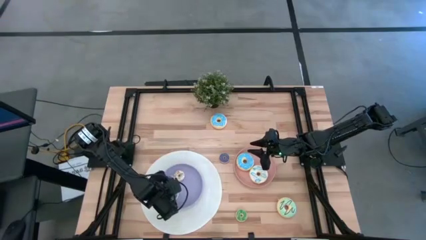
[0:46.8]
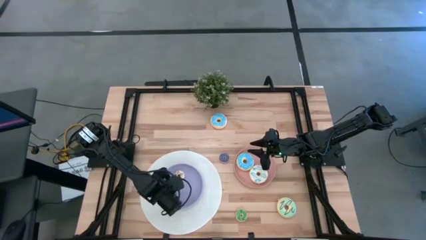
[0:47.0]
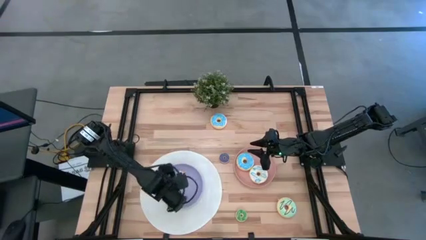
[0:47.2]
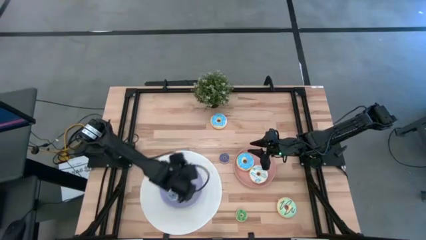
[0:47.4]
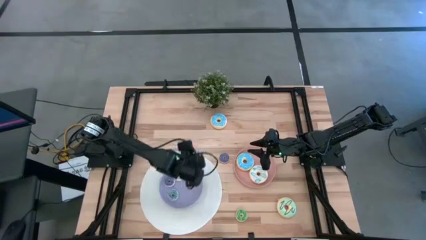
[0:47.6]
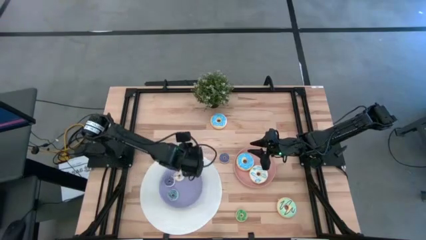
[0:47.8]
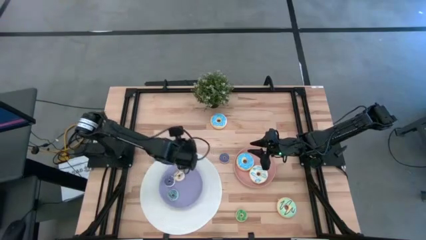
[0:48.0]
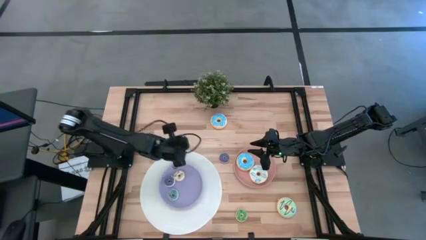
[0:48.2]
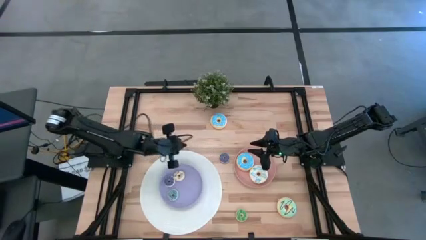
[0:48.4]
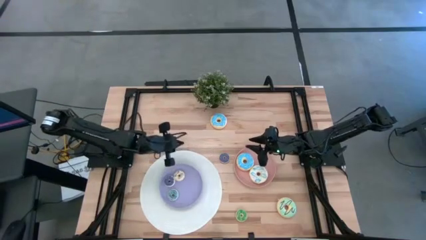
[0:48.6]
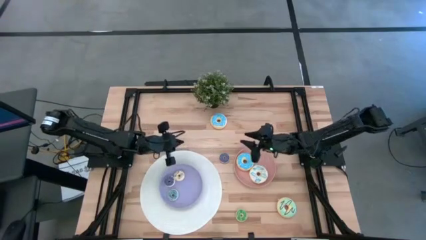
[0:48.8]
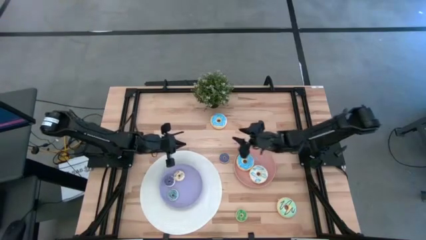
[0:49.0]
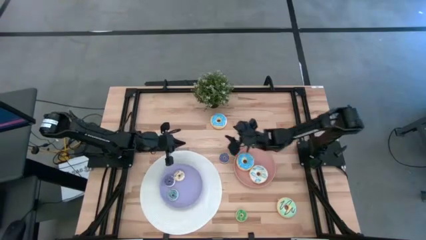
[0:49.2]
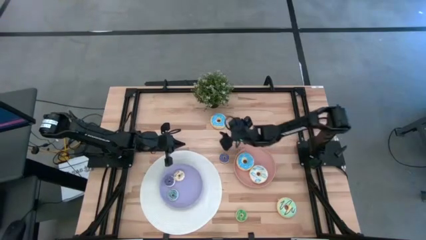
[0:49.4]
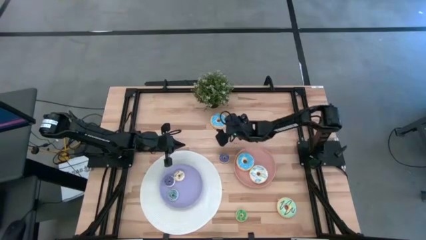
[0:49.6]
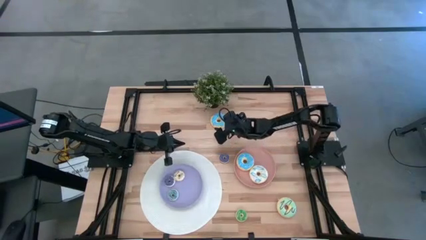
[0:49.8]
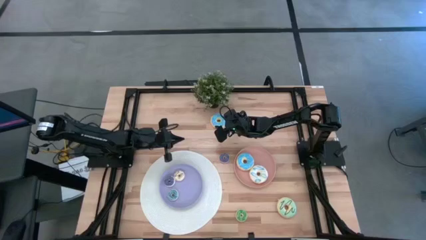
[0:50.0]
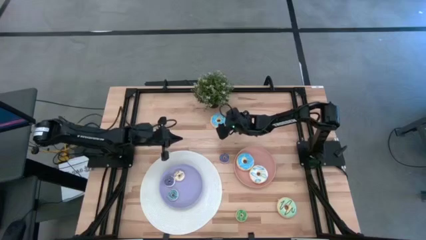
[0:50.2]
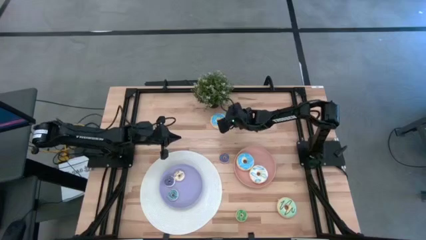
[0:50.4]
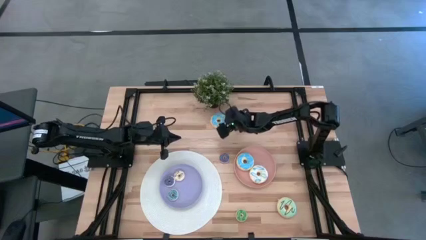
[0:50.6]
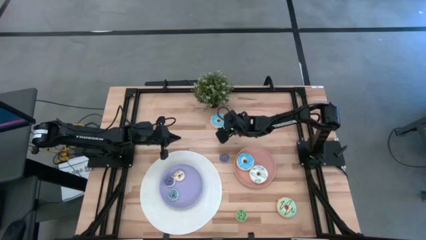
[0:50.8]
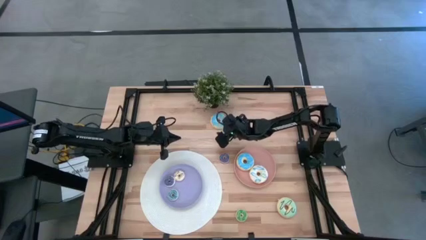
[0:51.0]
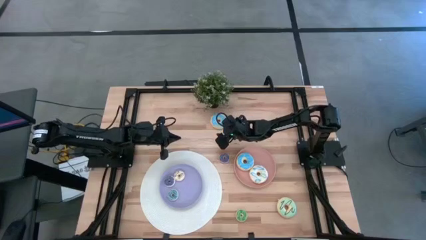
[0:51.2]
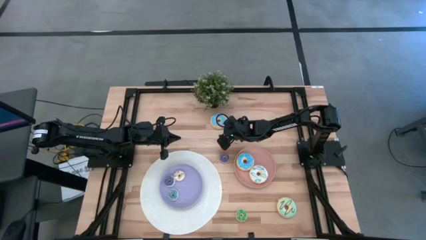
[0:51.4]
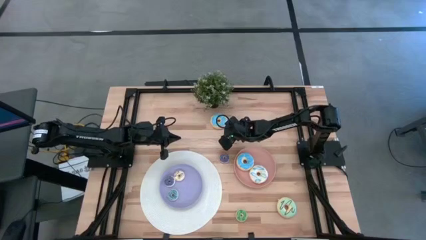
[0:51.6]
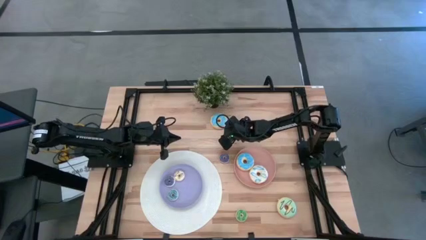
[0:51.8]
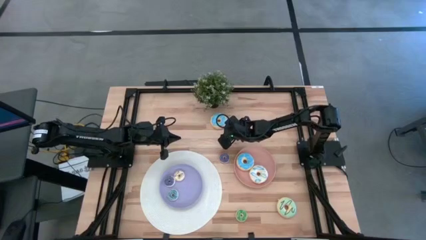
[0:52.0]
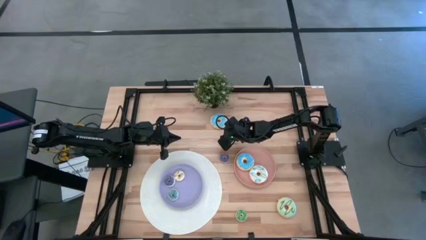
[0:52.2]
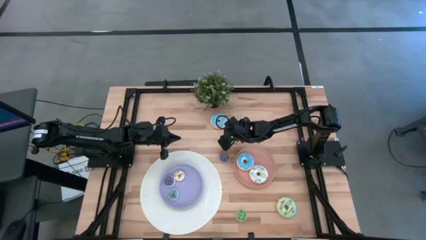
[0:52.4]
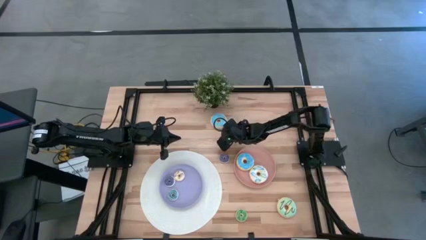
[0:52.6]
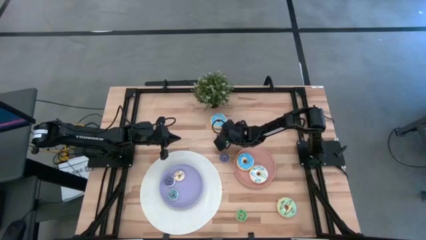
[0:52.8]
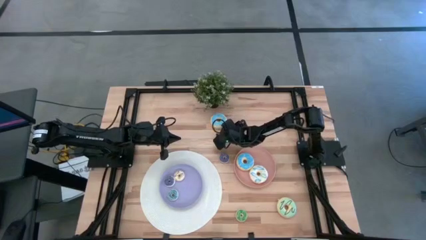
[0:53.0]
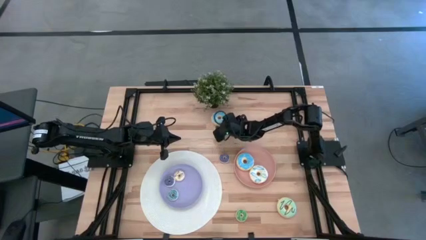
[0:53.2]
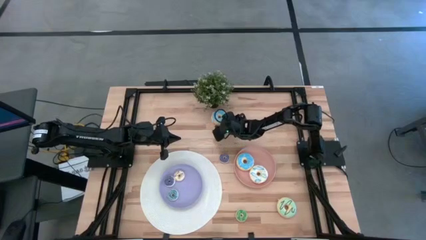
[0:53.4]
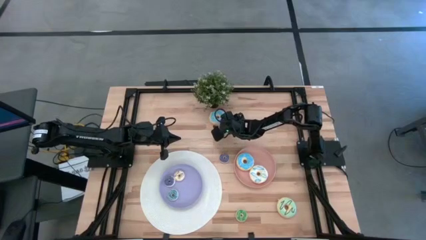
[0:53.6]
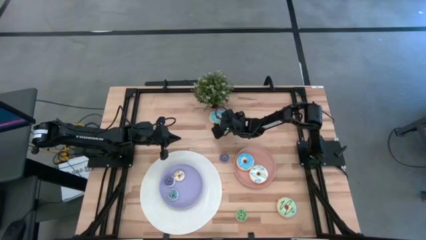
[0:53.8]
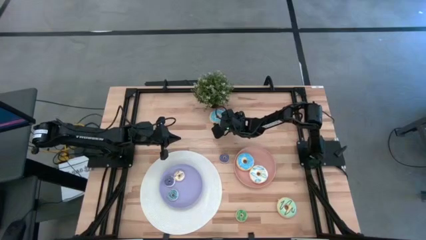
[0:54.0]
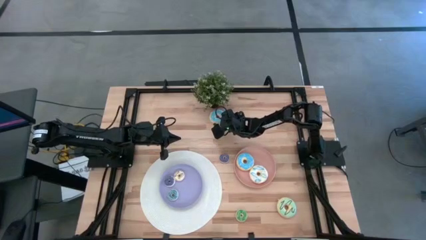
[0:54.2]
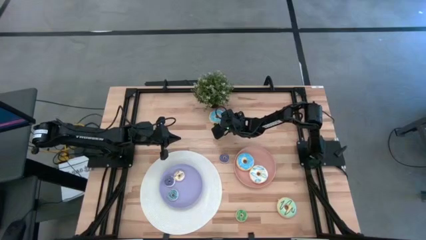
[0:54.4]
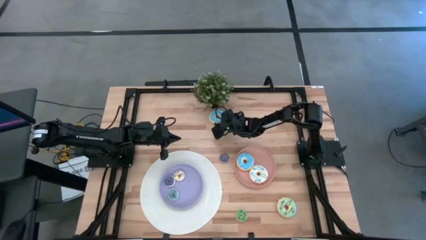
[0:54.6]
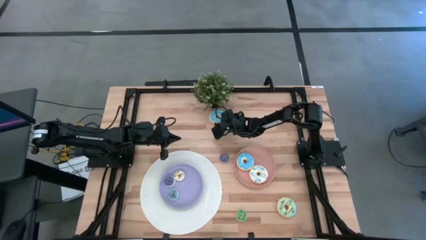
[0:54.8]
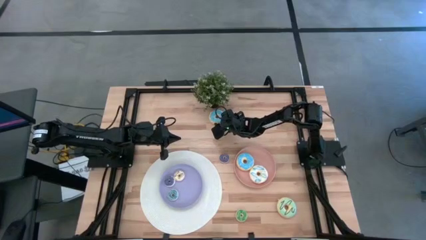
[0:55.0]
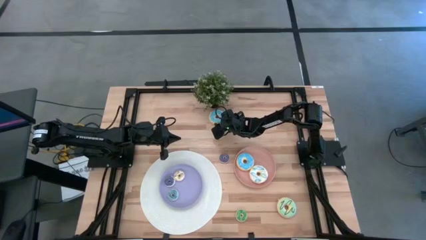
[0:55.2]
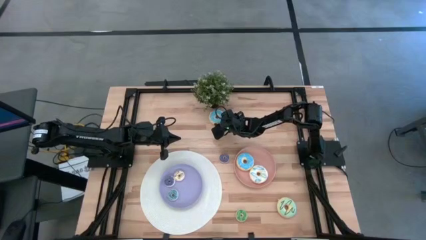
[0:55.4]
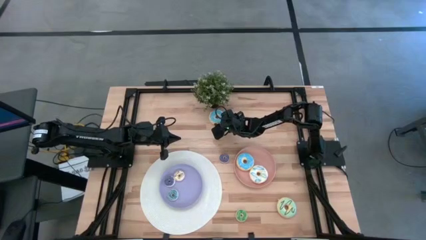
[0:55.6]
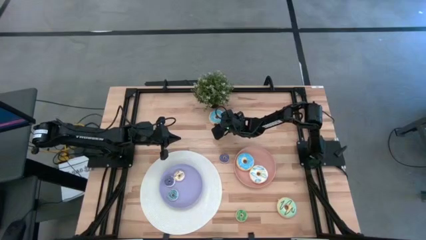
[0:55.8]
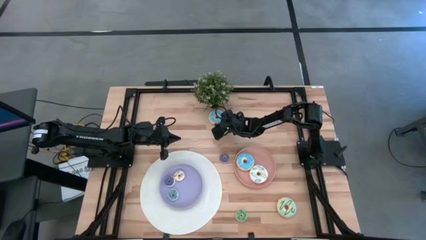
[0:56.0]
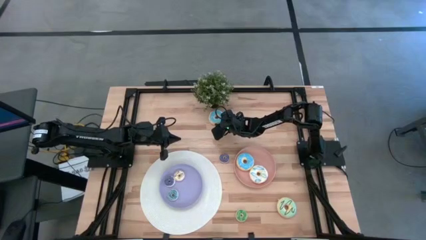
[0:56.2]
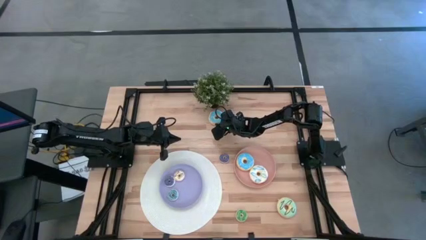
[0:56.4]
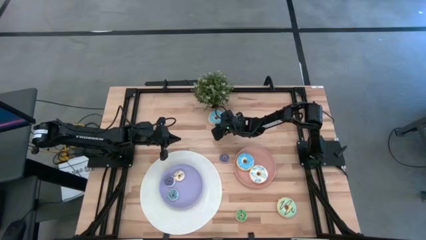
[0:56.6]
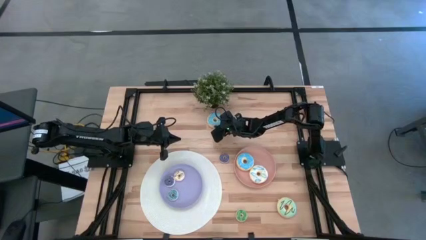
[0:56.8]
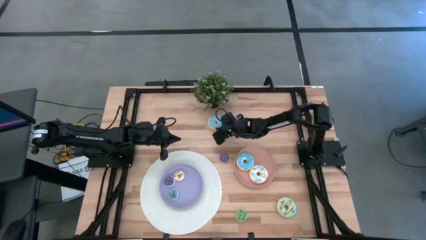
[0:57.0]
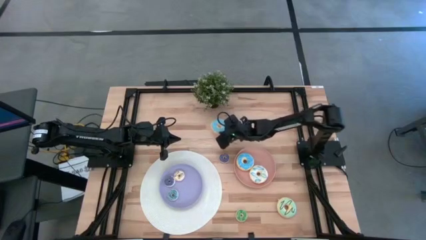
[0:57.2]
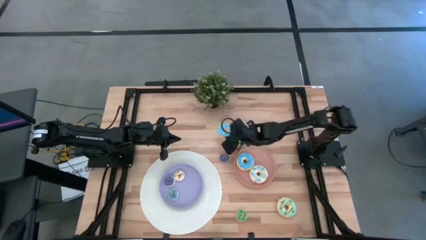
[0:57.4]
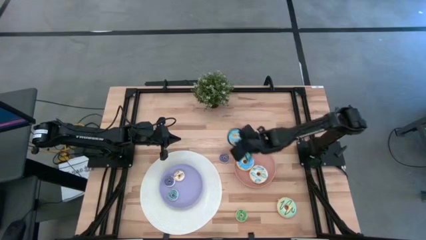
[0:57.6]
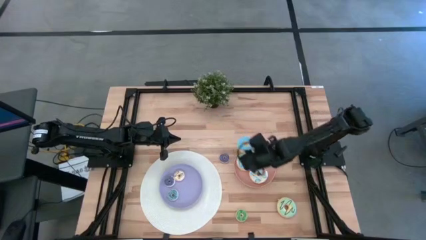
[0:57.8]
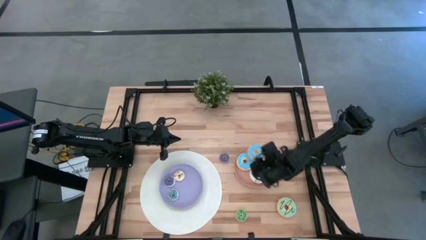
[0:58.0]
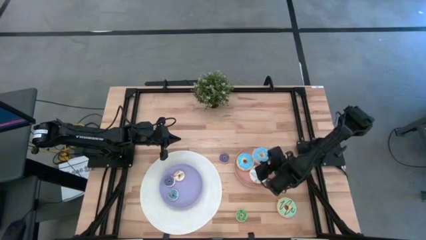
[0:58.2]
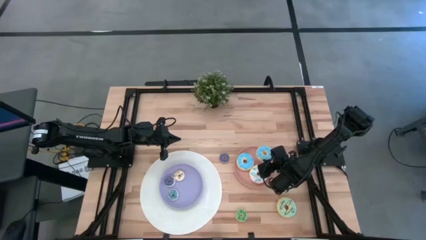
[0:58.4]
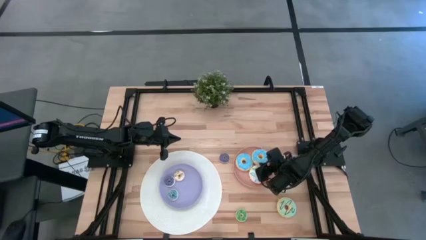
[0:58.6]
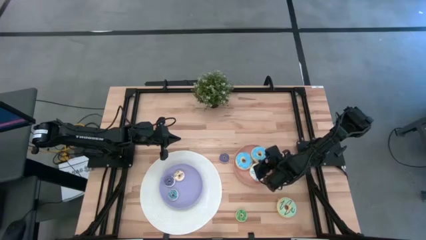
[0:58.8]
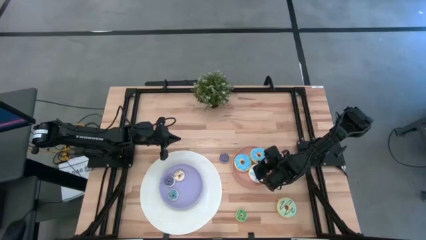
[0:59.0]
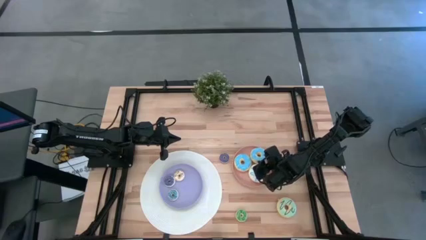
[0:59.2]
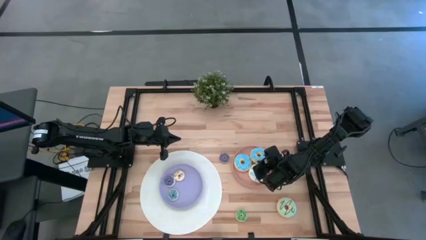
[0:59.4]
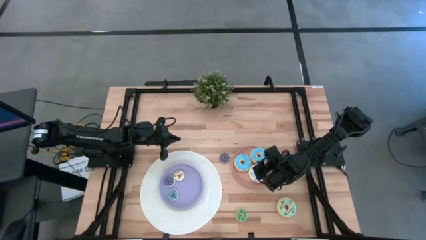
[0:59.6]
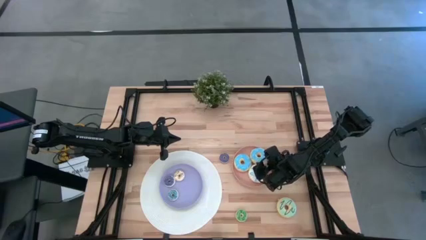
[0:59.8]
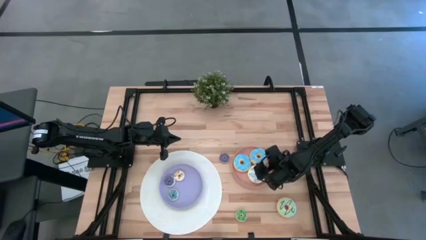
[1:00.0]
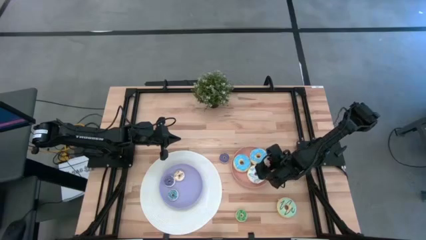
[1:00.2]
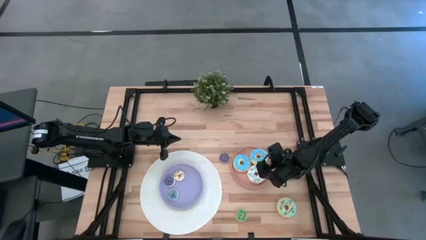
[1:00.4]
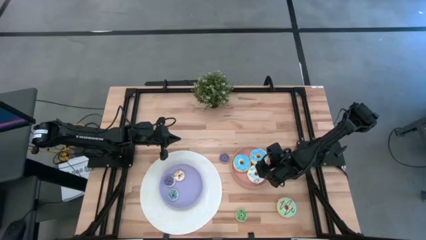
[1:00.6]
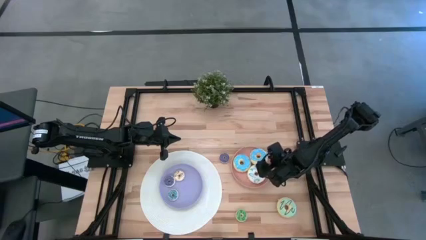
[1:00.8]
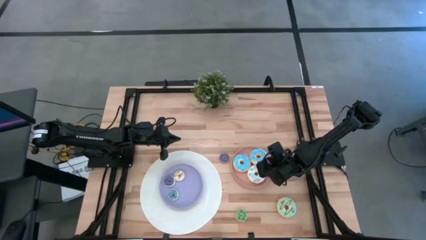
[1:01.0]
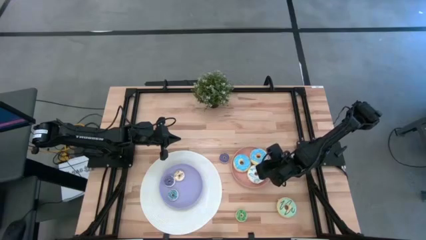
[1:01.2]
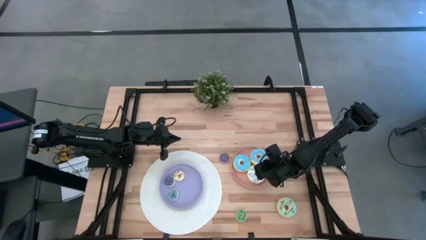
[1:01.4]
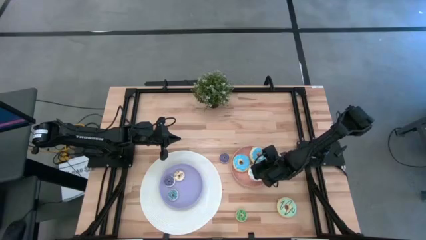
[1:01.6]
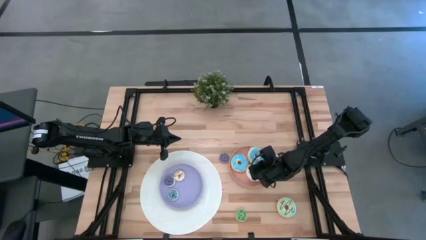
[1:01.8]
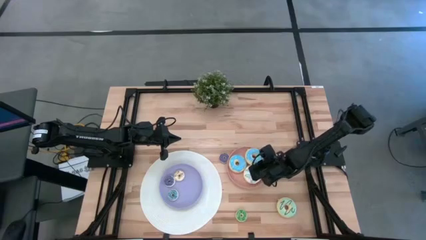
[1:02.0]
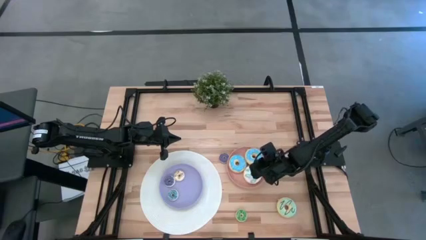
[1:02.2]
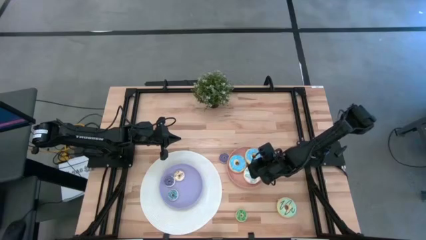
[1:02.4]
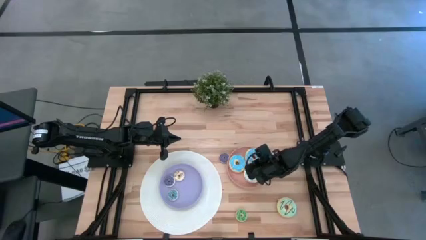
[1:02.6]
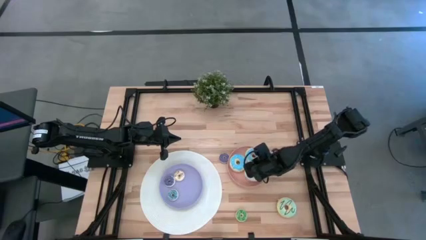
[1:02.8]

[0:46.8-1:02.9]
Task: Pick & Place donuts
Put the big blue donut on the pink plate
